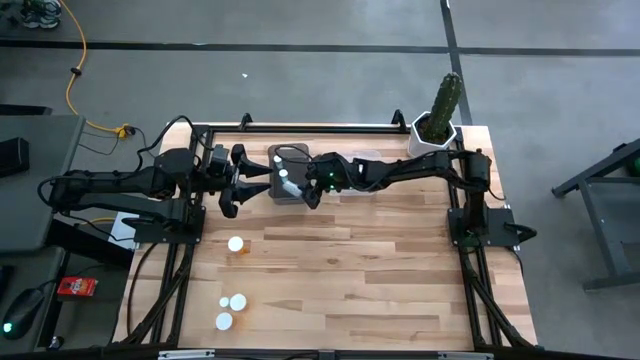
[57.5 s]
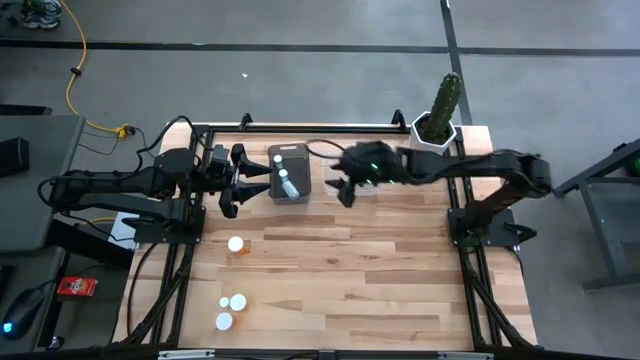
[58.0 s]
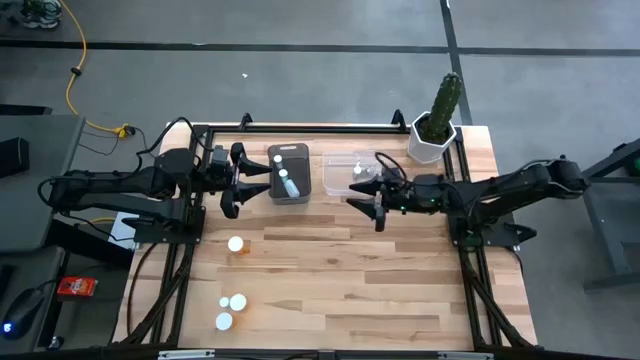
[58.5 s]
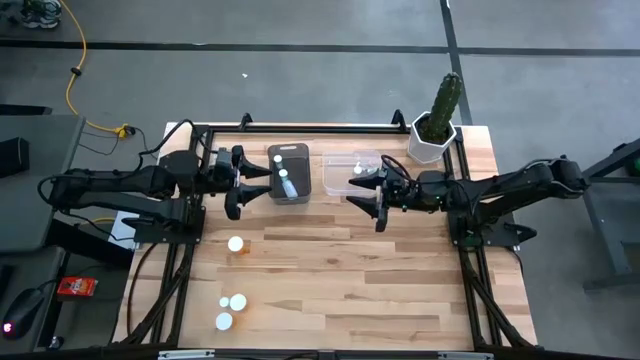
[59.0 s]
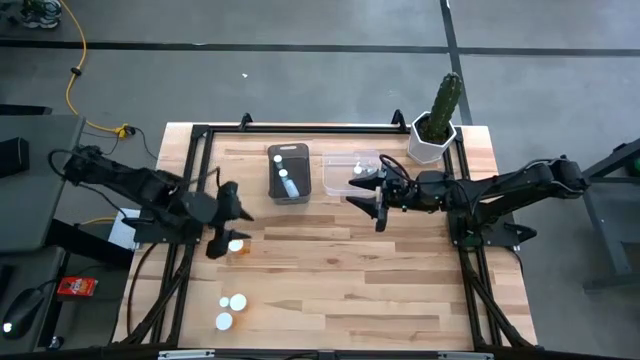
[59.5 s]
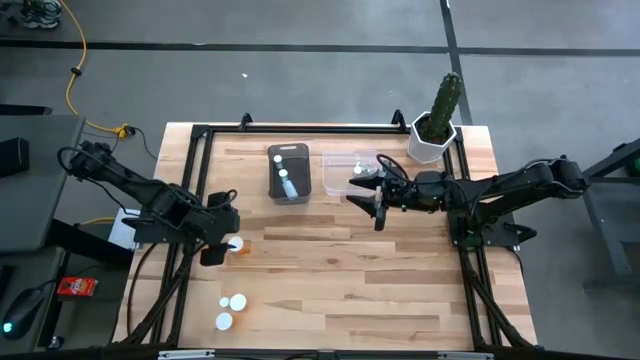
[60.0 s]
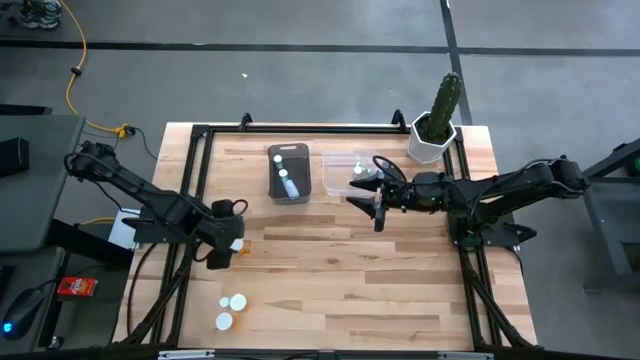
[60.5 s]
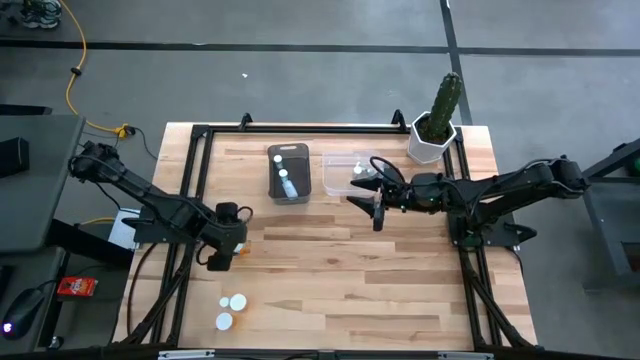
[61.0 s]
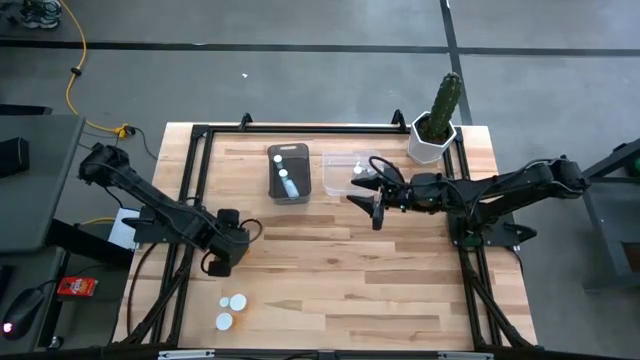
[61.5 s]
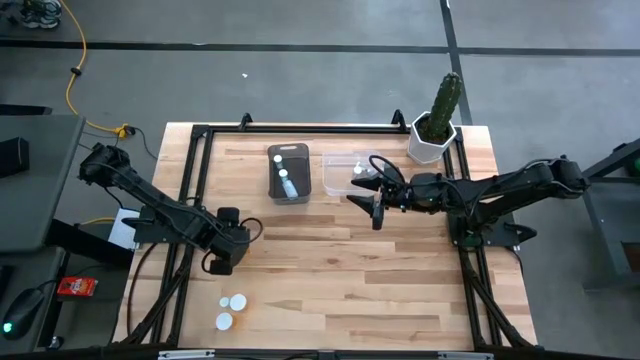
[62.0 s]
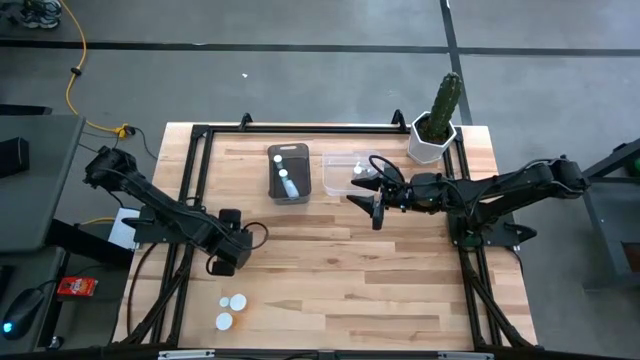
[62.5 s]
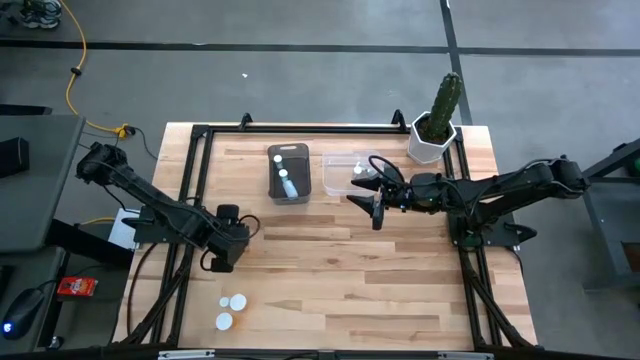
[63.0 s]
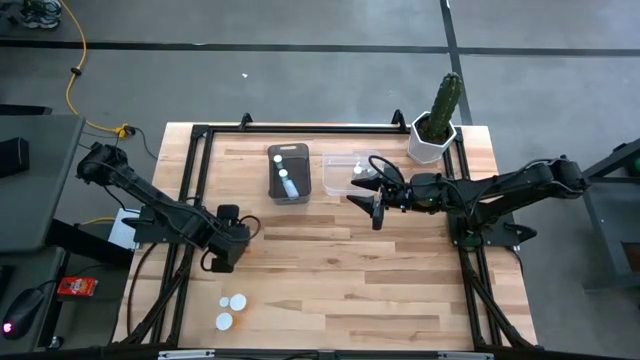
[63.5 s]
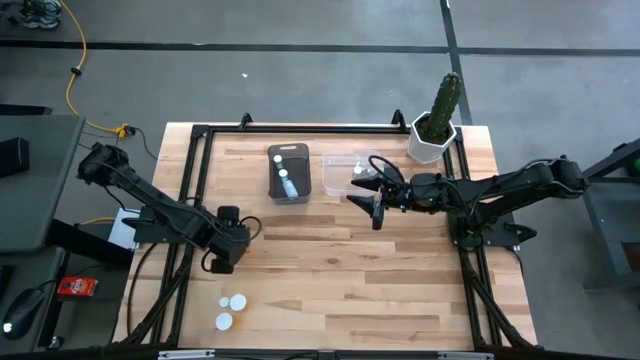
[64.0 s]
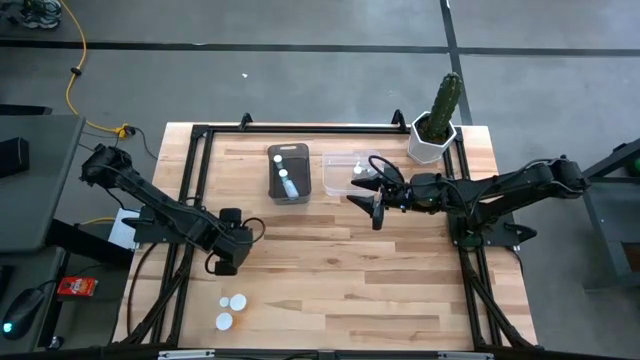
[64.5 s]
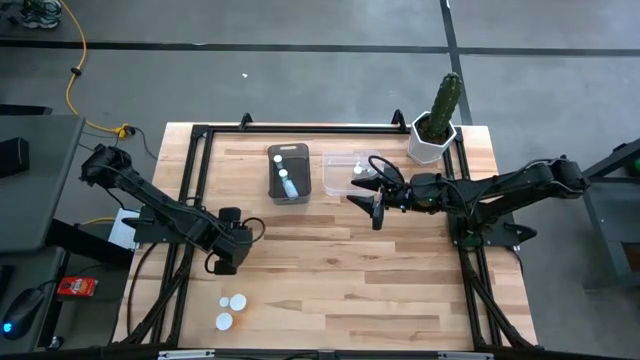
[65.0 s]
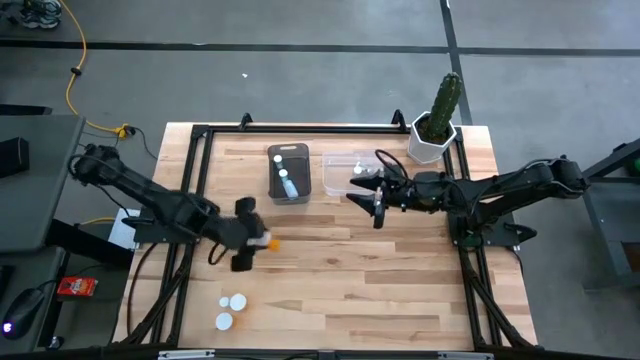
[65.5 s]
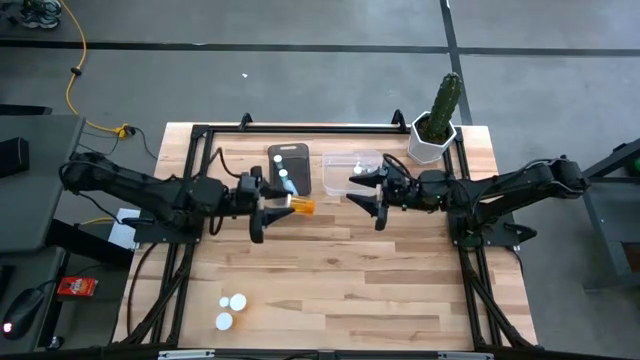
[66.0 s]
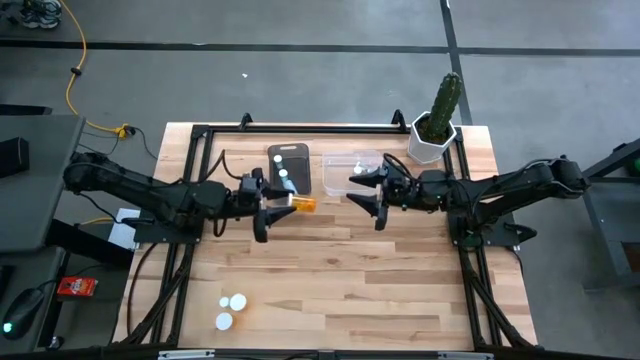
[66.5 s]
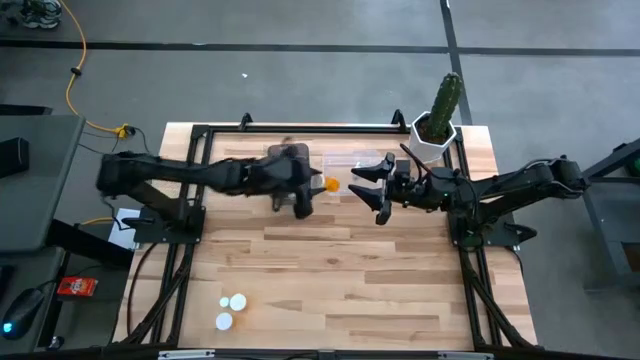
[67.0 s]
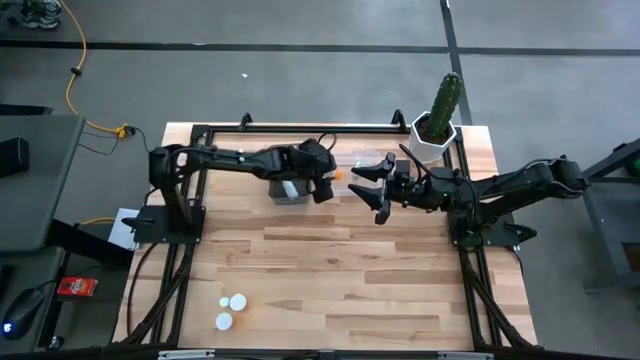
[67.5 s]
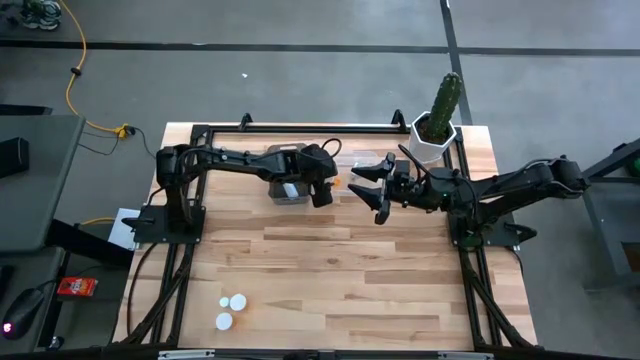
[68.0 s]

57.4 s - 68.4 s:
Task: Pick and place medicine bottles into bin by pill shape (circle, oval)
Put the orange capsule bottle into the transparent bin

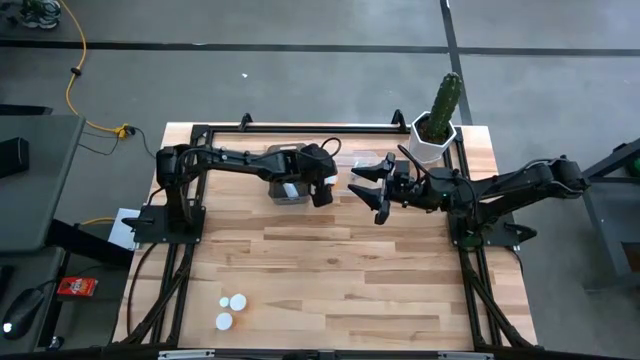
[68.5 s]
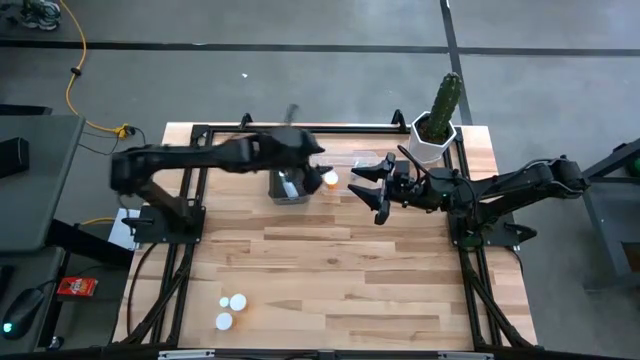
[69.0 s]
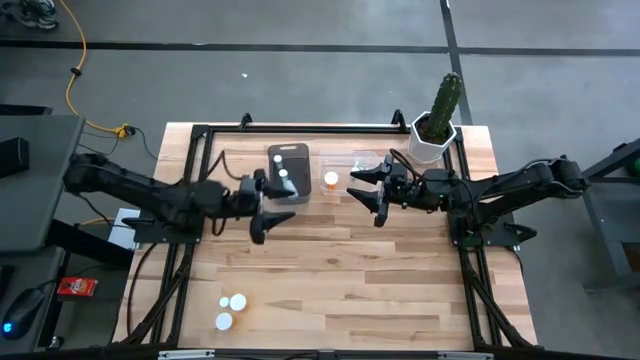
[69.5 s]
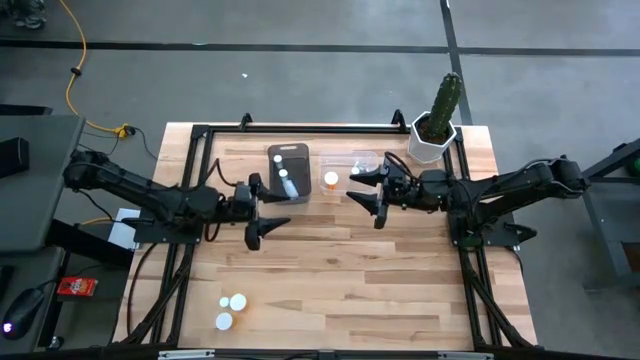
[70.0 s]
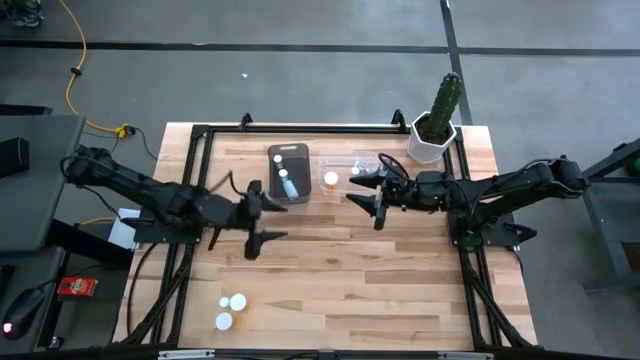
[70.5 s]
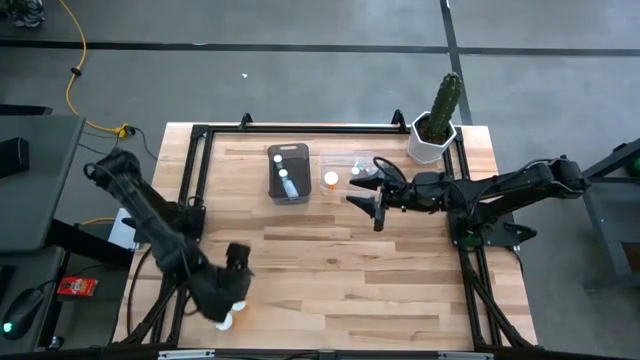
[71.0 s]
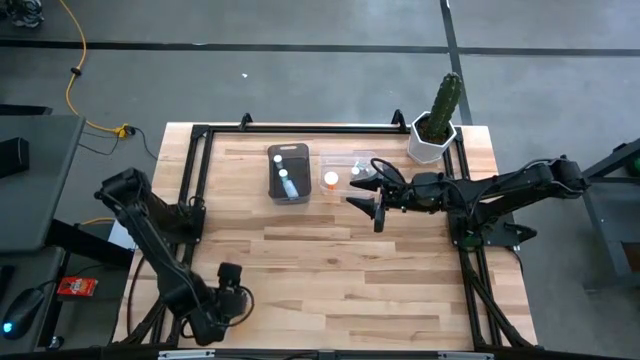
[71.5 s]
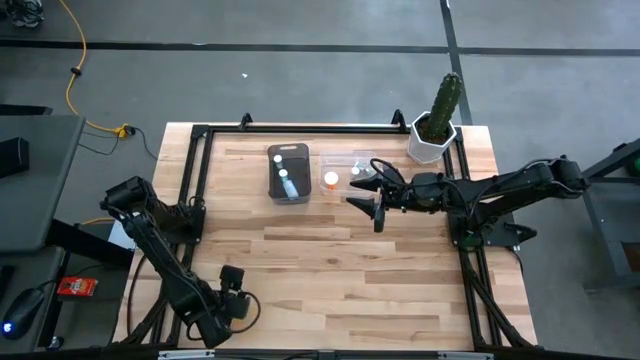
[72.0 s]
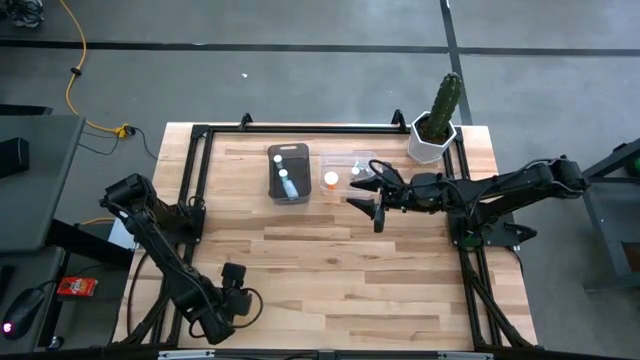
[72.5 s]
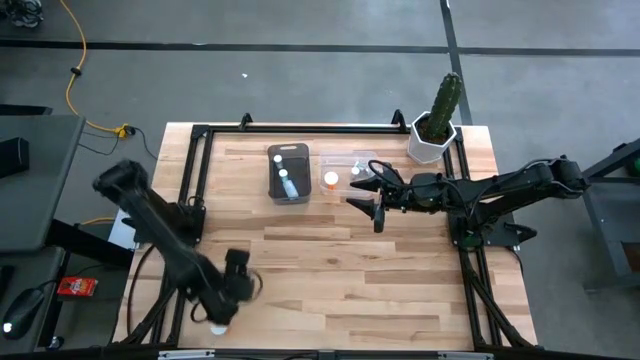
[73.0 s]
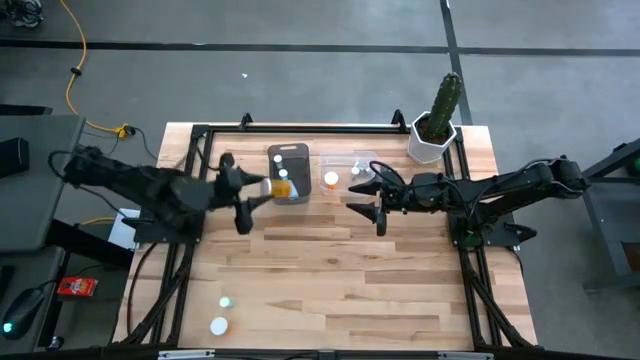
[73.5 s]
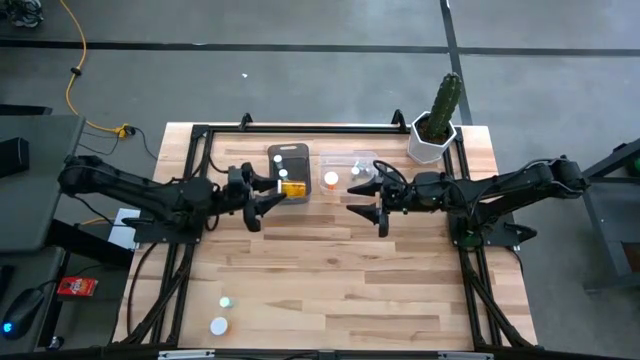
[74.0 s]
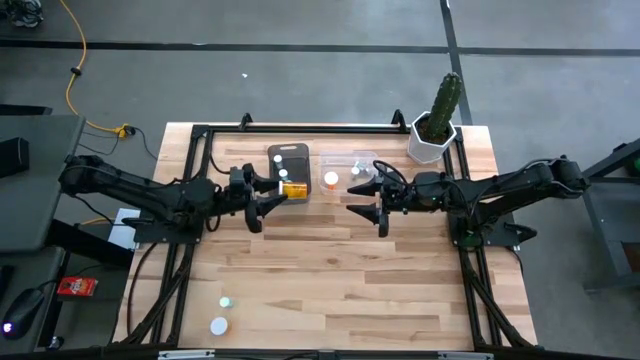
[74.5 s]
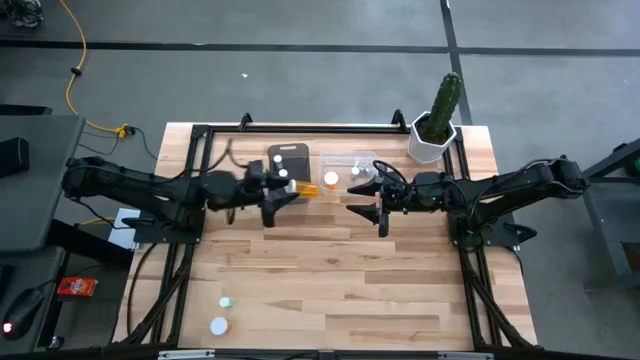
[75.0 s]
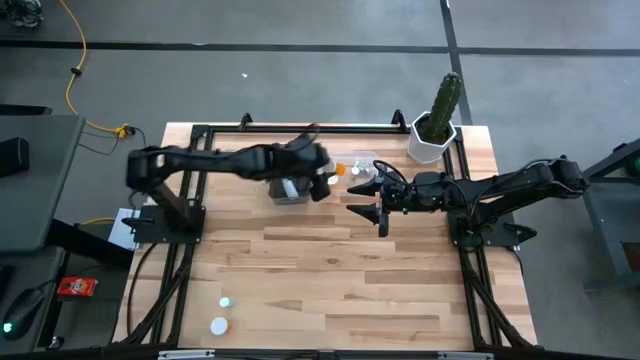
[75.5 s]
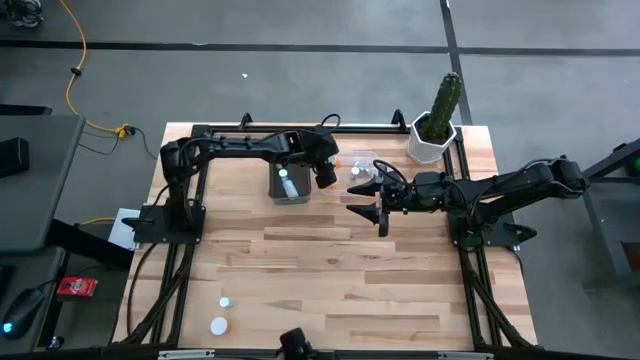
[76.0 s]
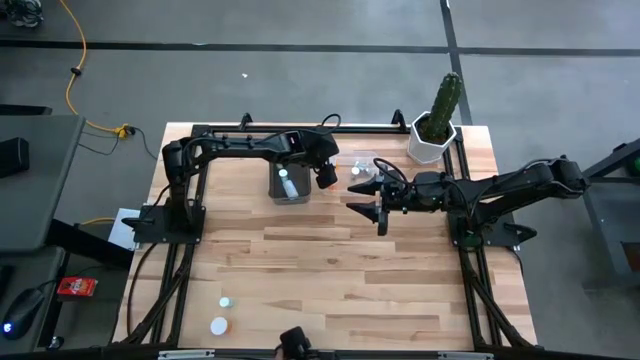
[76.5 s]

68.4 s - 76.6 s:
Put the orange capsule bottle into the transparent bin

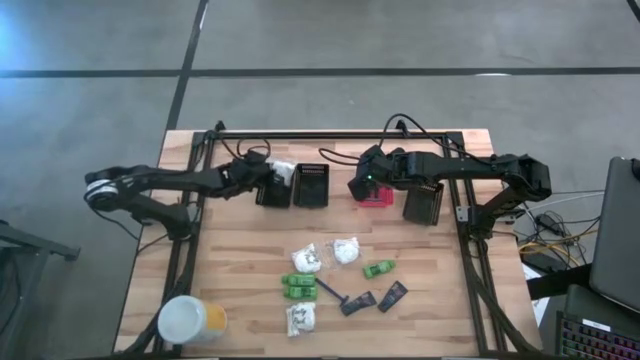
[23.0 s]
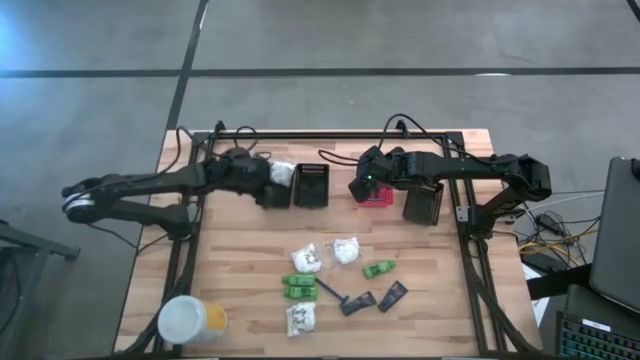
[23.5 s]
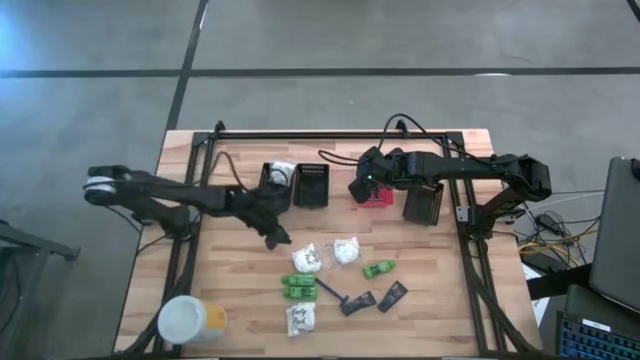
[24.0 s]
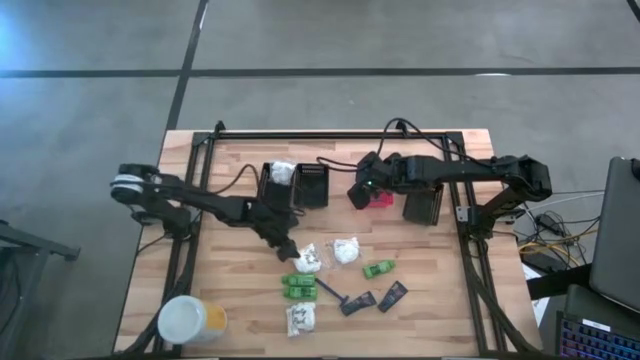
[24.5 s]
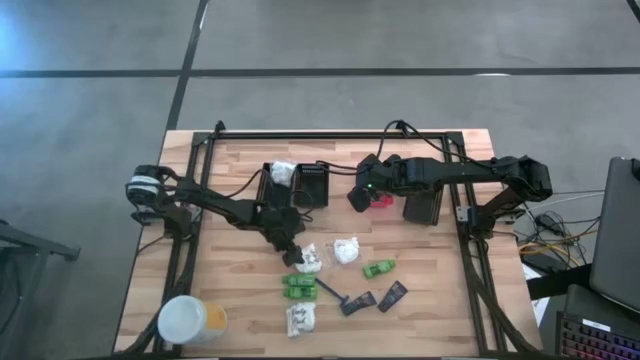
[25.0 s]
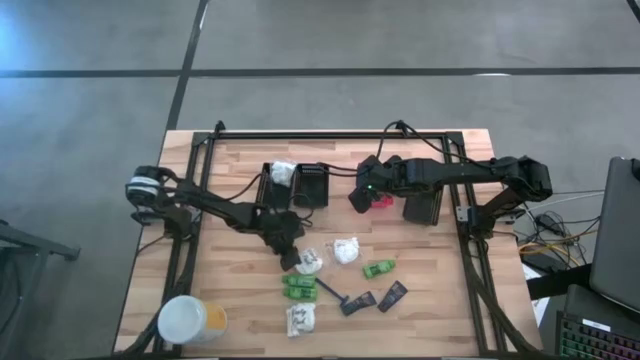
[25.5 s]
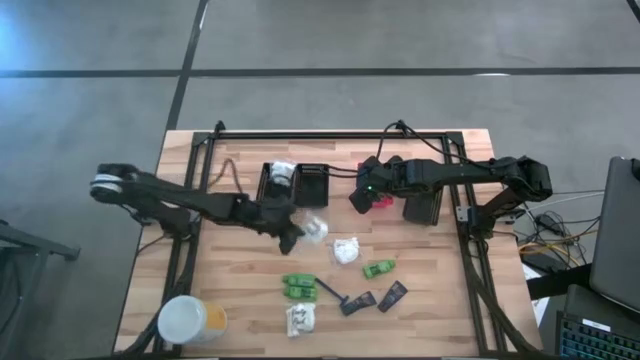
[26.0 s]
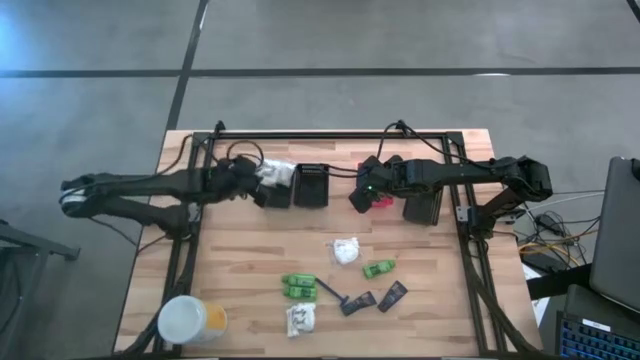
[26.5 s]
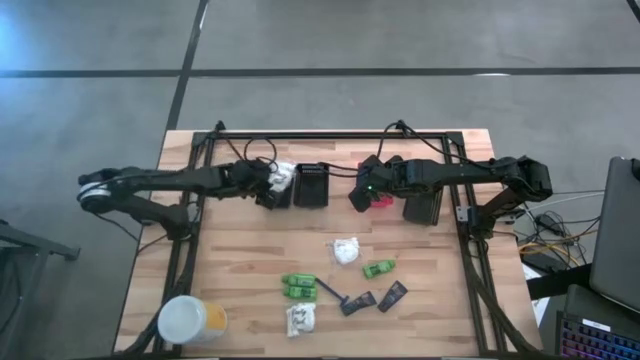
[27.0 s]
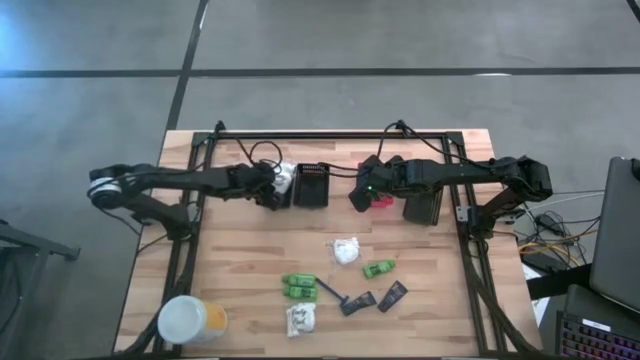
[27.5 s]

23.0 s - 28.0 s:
Task: Pick & Place Travel size toiletries
Put the white cotton pack into the left black bin
